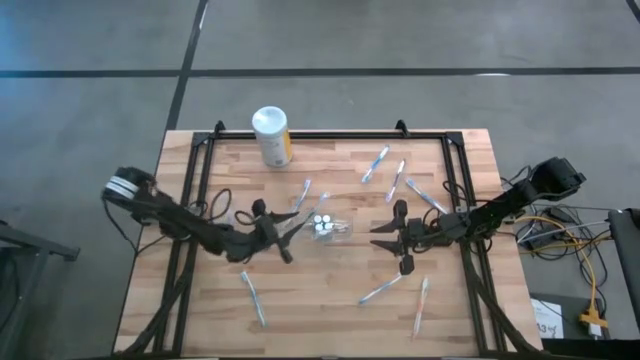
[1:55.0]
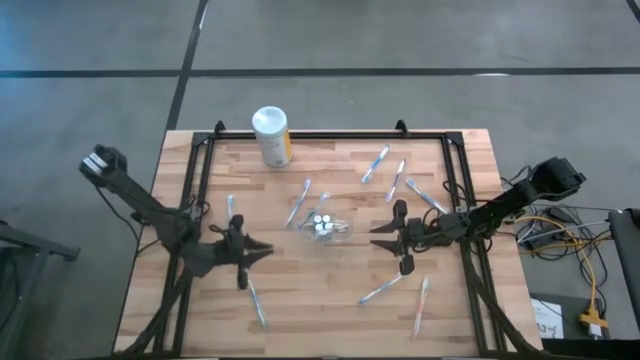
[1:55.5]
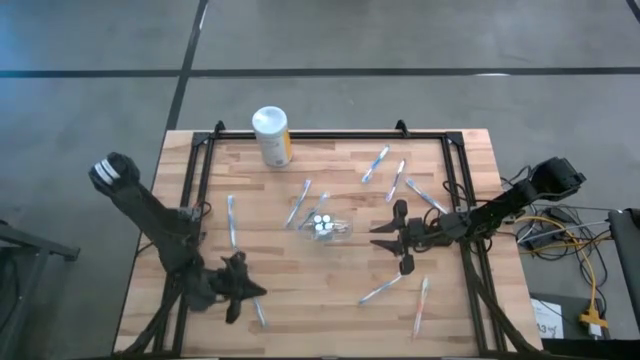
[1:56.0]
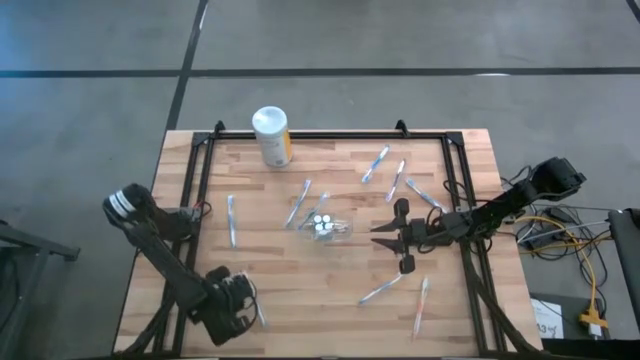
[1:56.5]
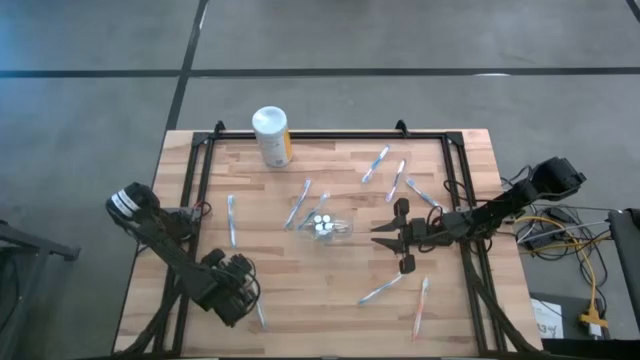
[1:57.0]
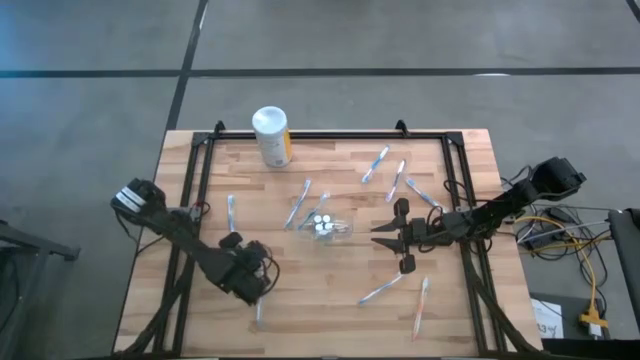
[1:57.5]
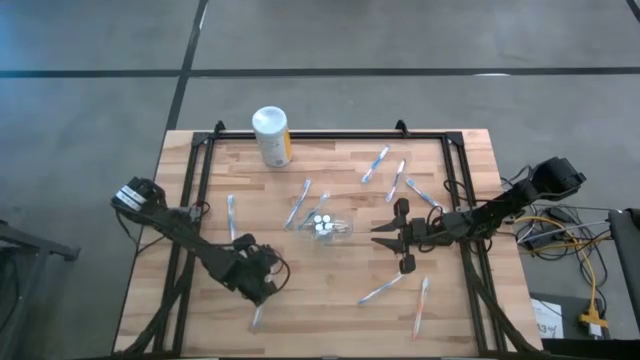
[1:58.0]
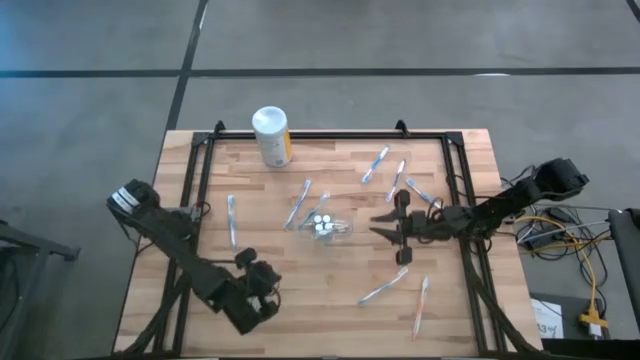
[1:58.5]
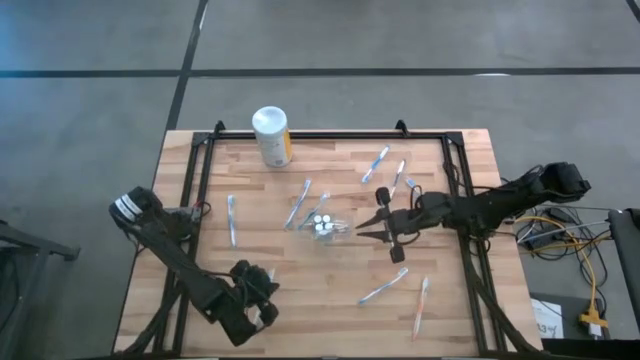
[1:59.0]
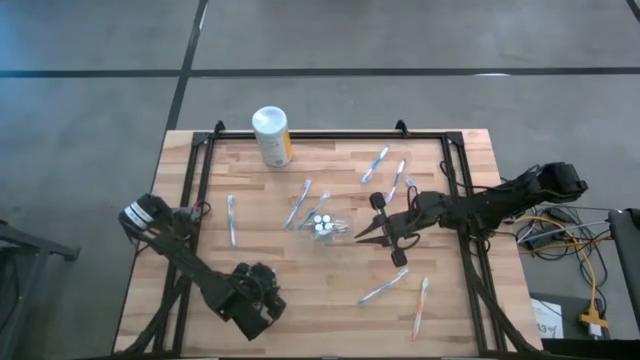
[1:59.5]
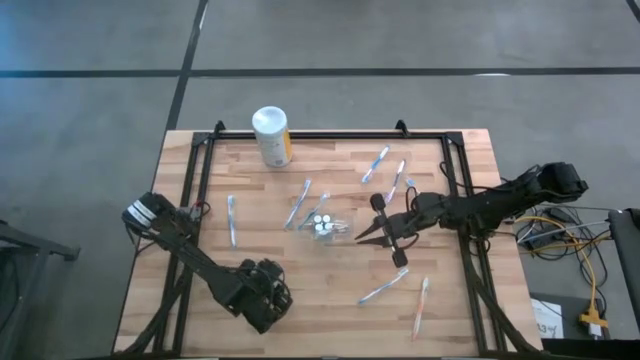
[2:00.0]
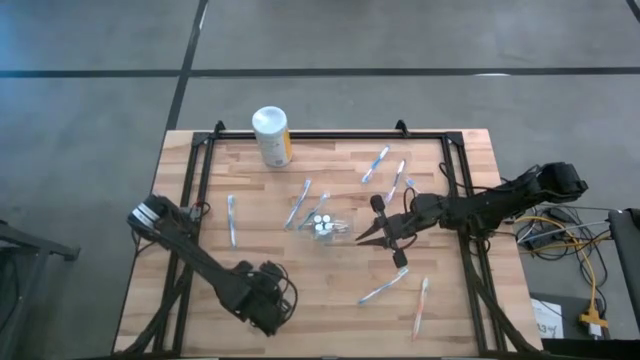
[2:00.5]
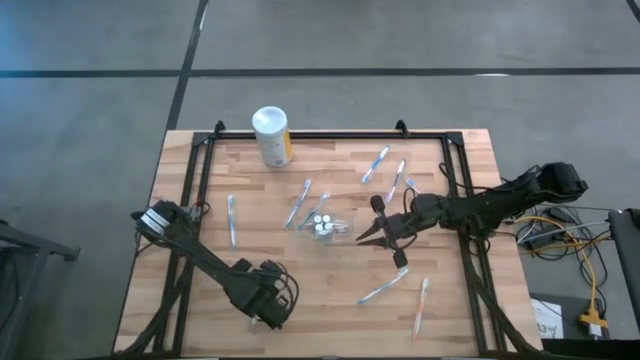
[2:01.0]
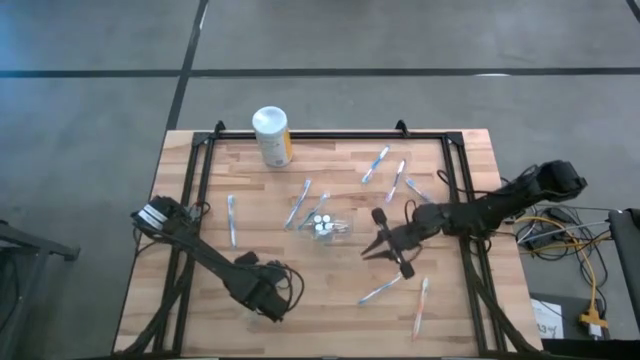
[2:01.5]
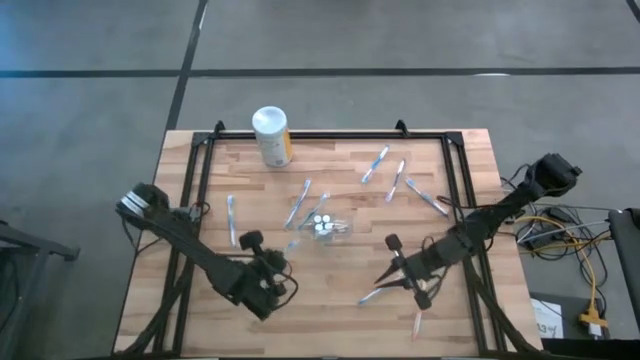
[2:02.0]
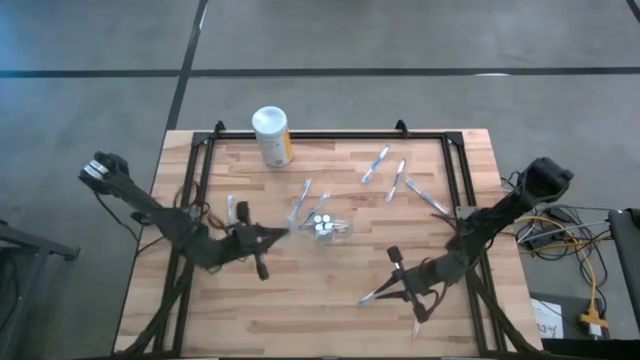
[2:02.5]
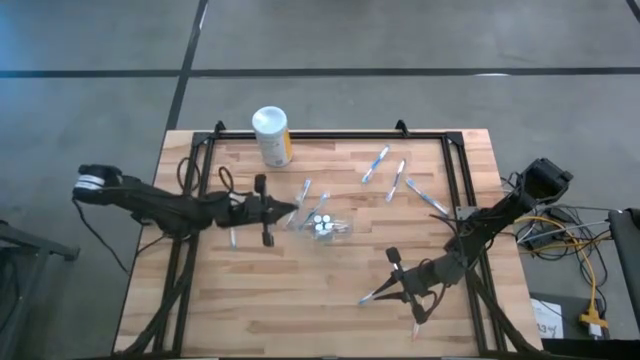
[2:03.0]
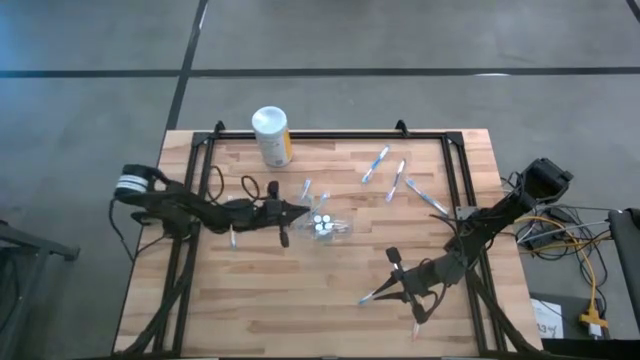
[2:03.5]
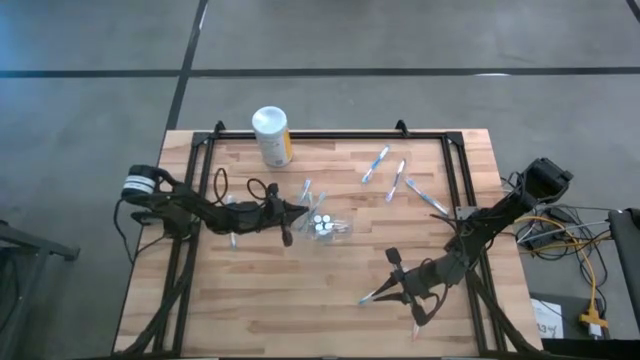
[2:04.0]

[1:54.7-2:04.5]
Task: Pick & Place toothbrushing station
Put the blue toothbrush into the transparent organizer

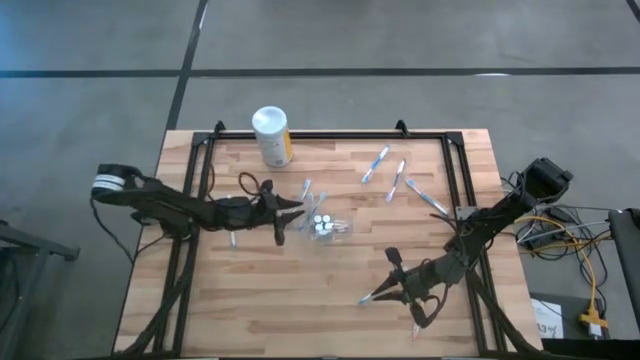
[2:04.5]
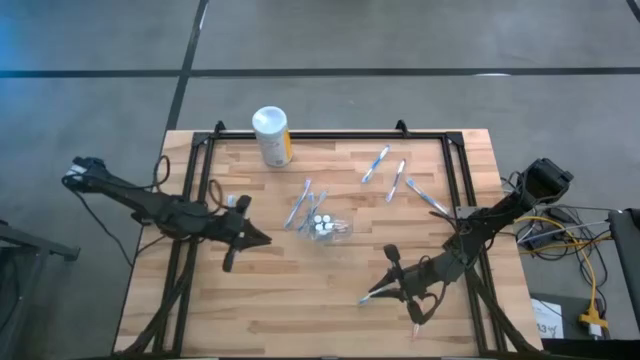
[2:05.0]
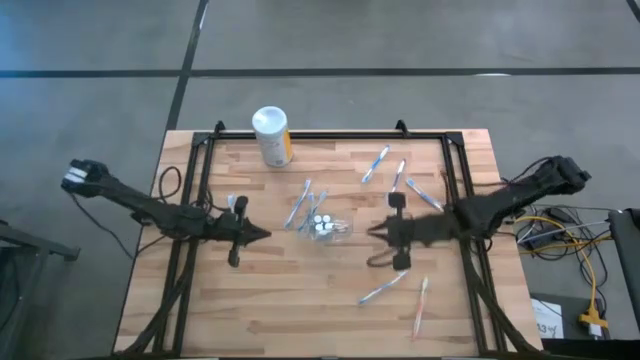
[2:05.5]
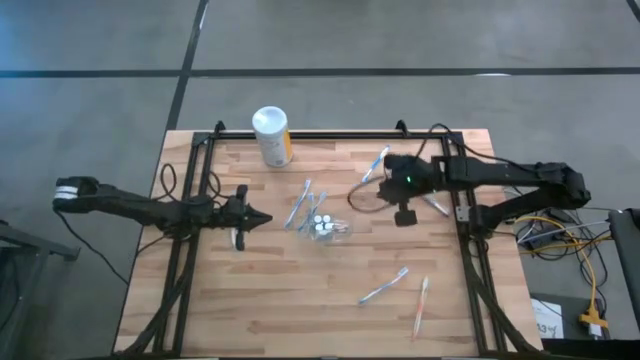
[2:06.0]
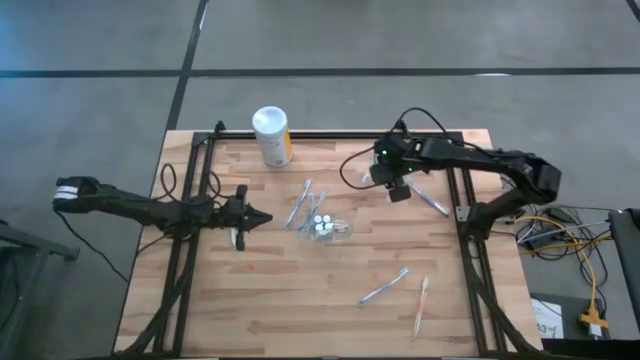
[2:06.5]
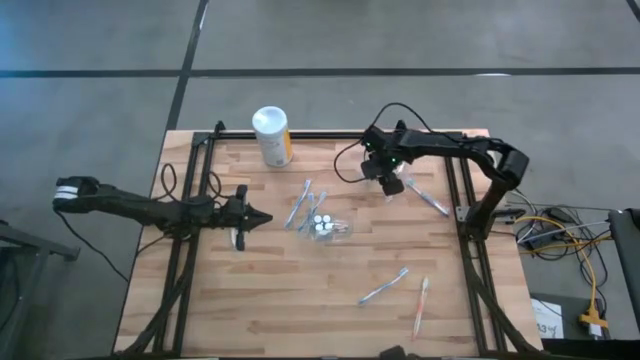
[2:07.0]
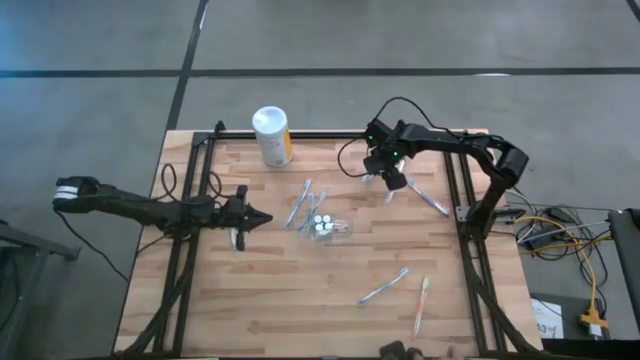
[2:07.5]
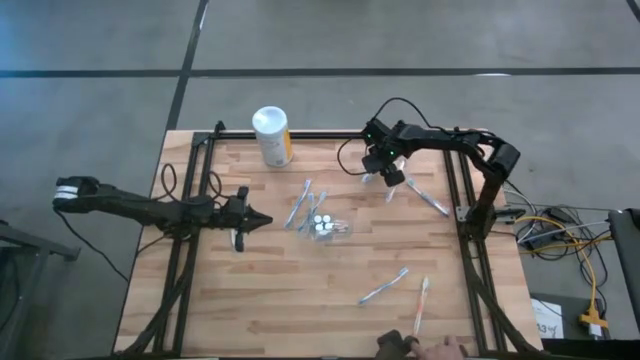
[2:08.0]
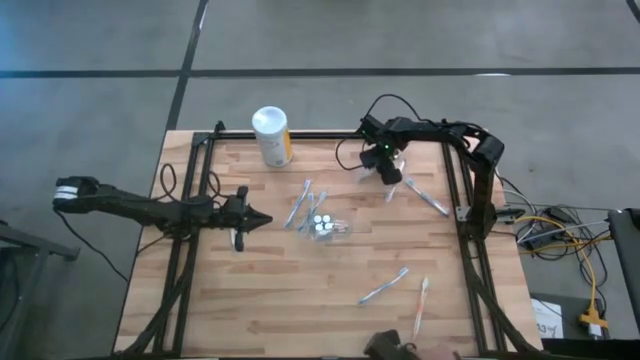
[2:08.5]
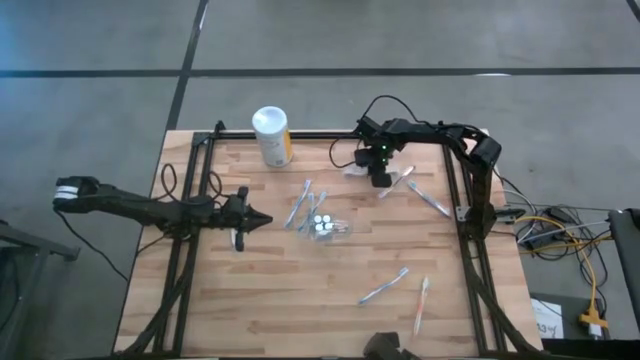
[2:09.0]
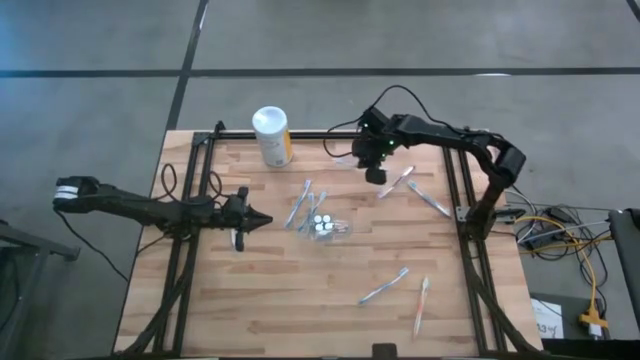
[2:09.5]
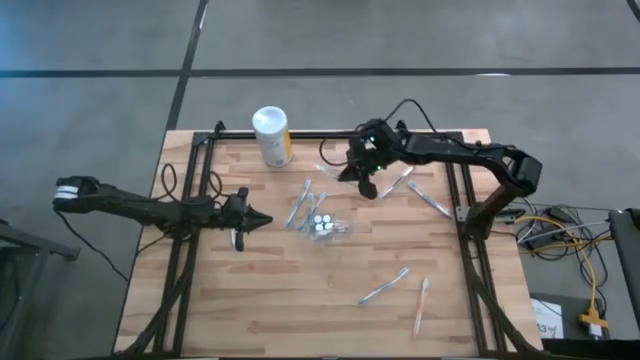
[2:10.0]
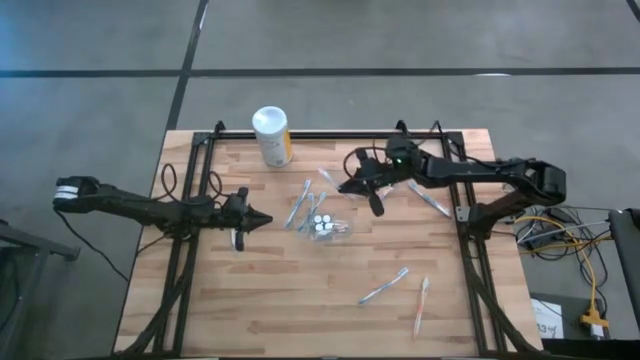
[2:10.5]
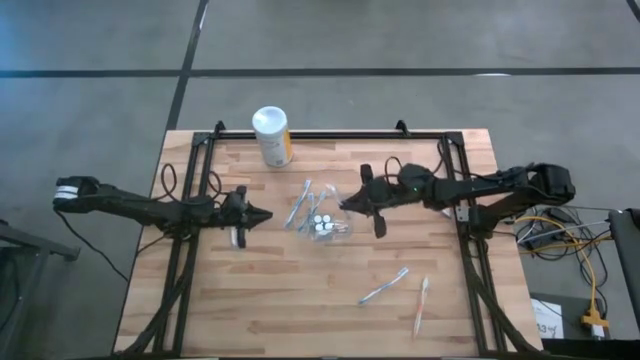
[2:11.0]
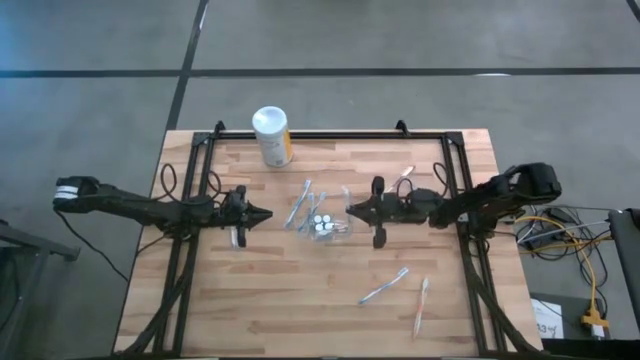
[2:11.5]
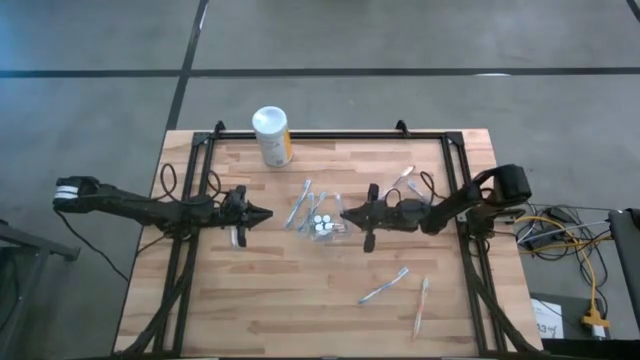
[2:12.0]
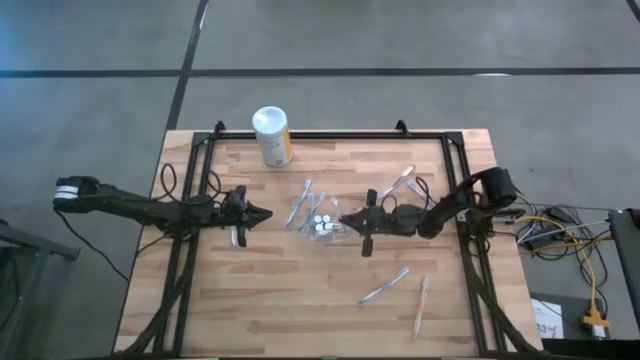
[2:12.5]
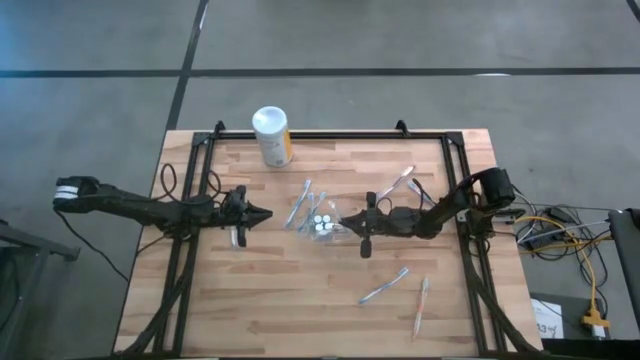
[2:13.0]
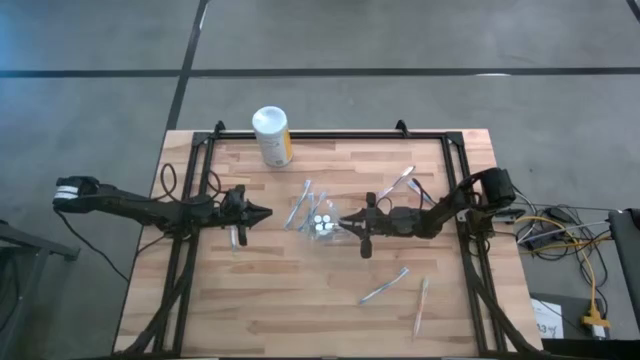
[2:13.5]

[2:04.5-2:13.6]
Put the blue toothbrush into the transparent organizer

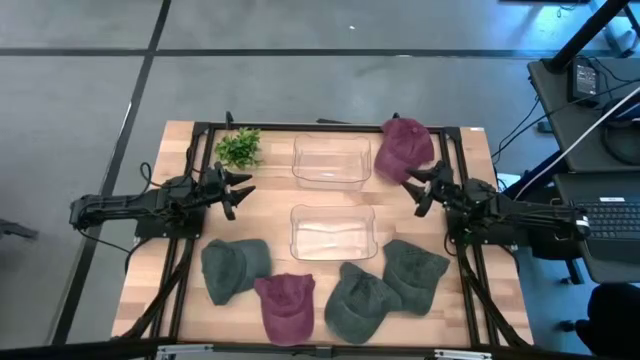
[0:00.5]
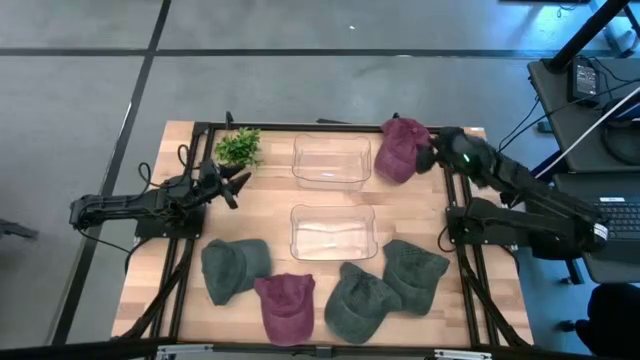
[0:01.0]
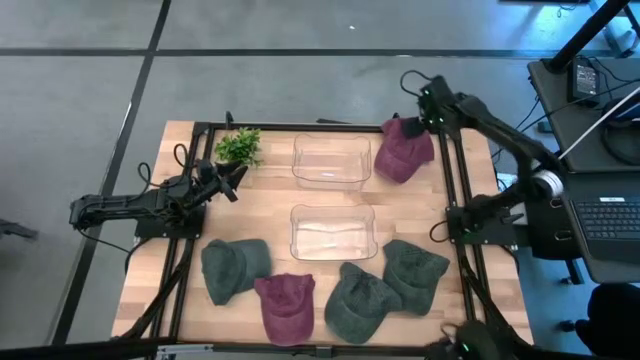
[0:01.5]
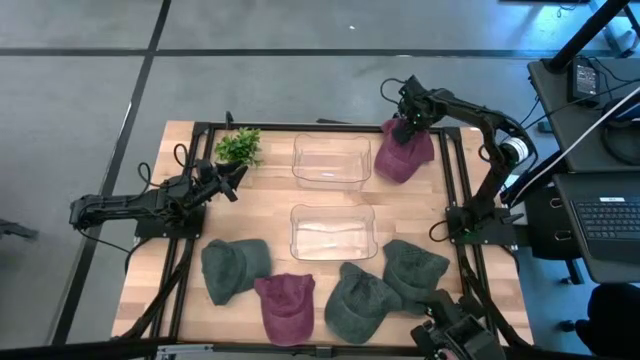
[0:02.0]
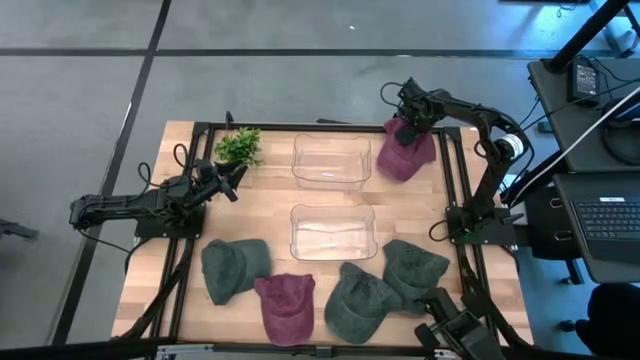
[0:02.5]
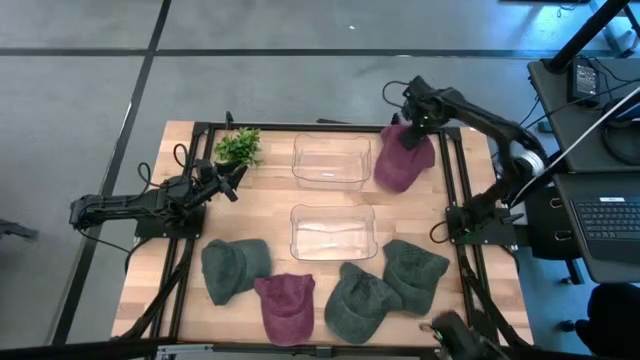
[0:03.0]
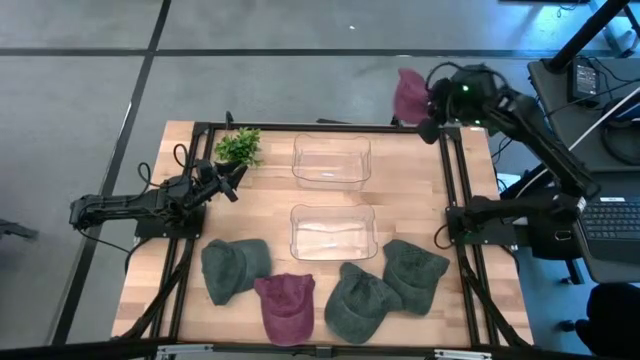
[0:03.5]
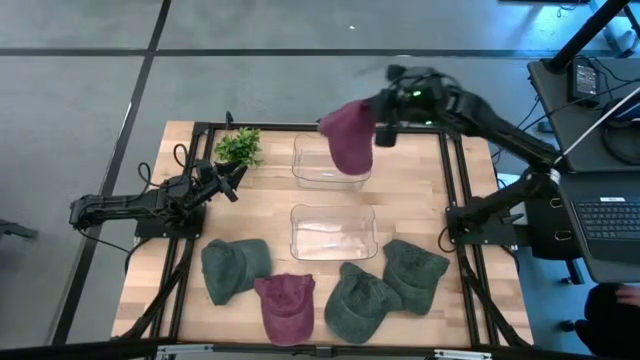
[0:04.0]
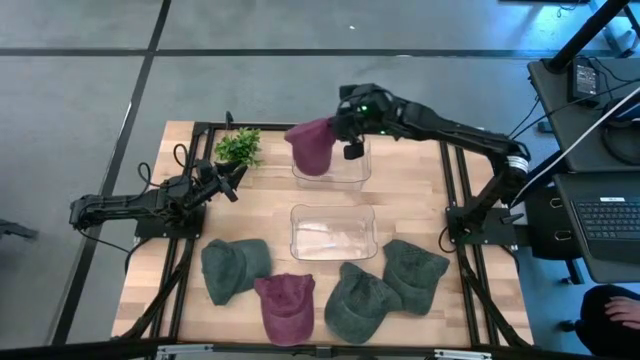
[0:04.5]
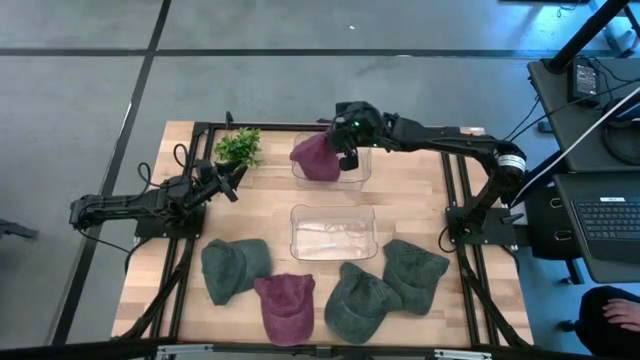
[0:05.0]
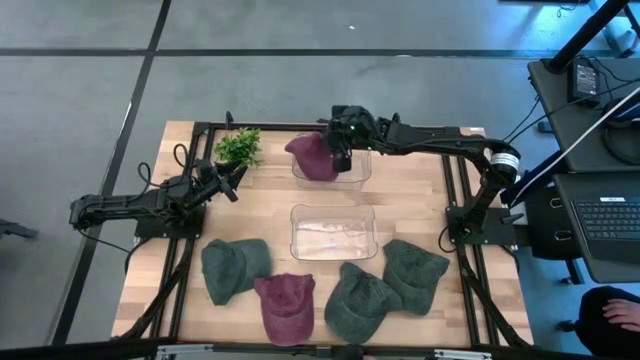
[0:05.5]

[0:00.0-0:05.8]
Task: Pick & Place hat
Put the top red cap into the top transparent bin
